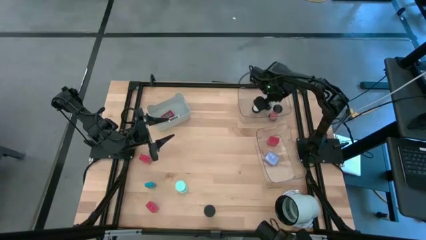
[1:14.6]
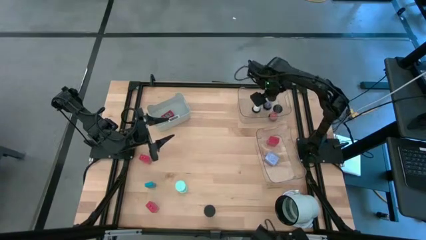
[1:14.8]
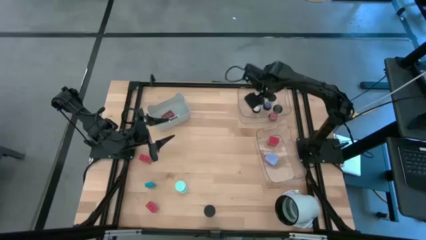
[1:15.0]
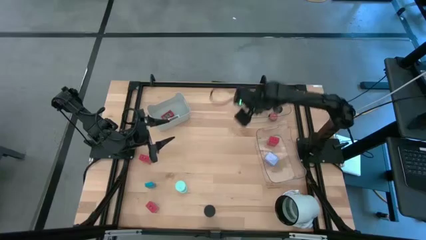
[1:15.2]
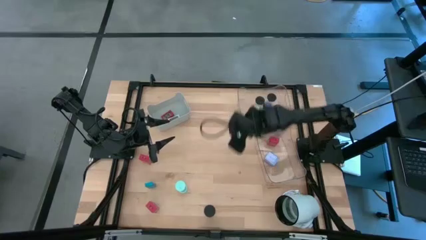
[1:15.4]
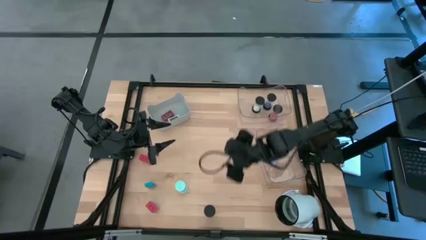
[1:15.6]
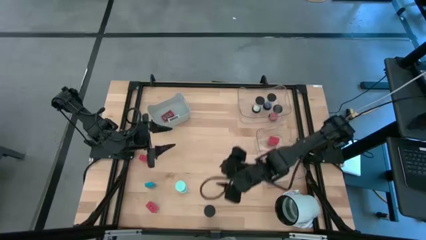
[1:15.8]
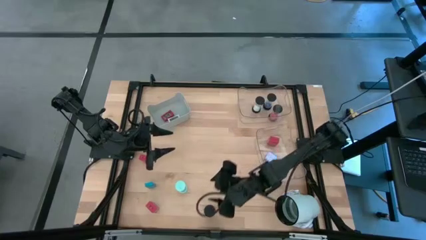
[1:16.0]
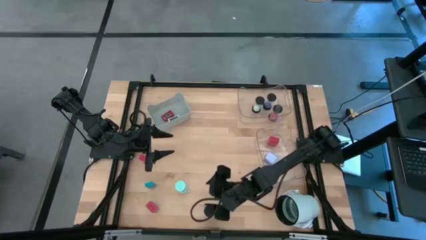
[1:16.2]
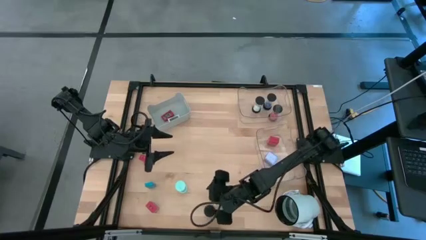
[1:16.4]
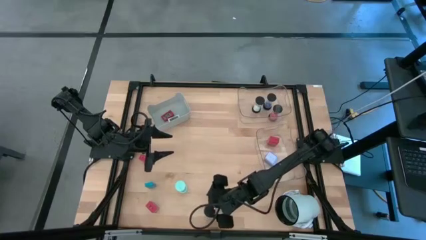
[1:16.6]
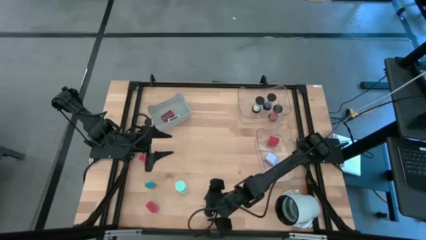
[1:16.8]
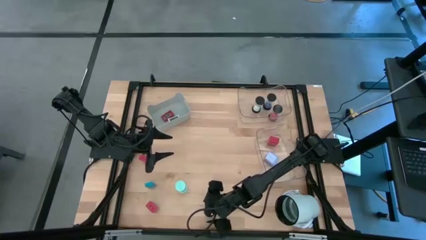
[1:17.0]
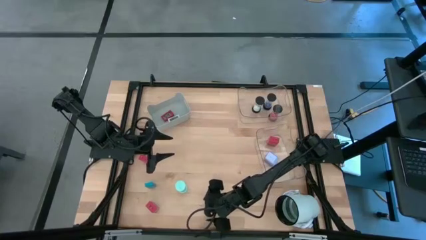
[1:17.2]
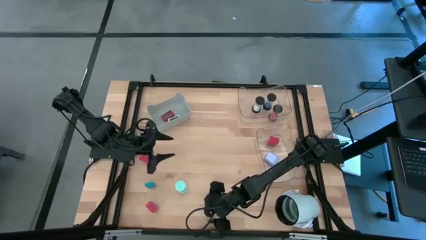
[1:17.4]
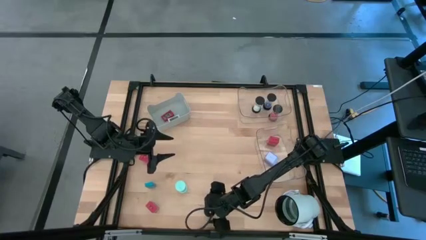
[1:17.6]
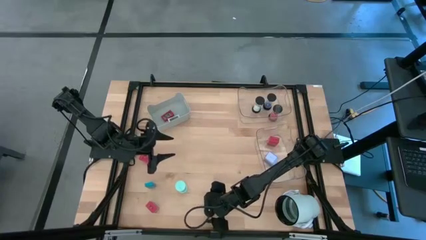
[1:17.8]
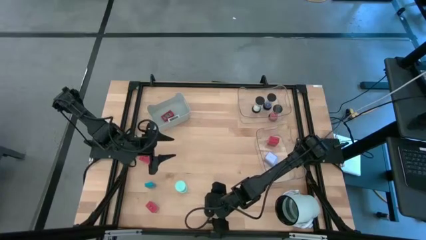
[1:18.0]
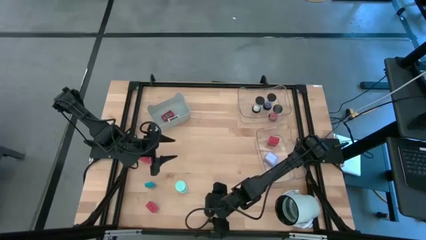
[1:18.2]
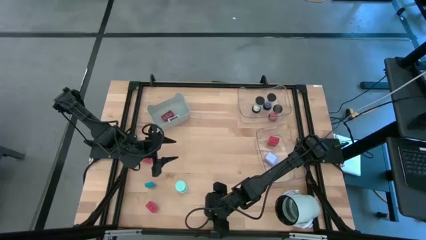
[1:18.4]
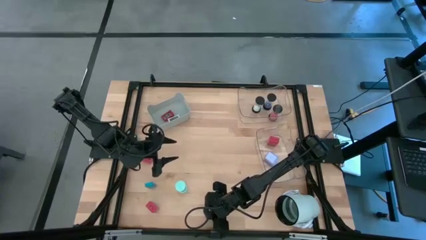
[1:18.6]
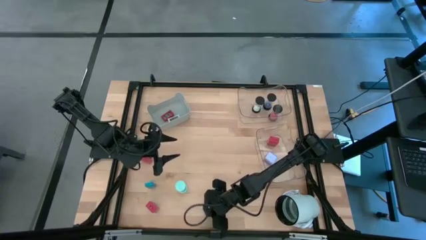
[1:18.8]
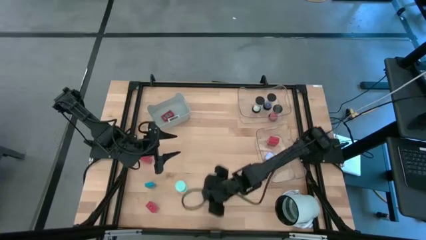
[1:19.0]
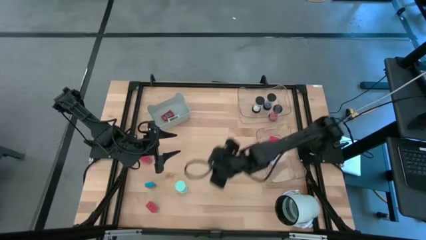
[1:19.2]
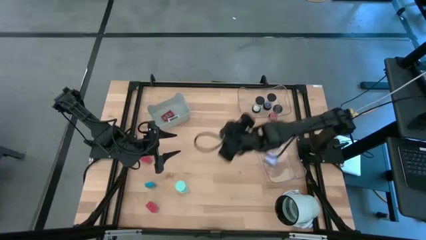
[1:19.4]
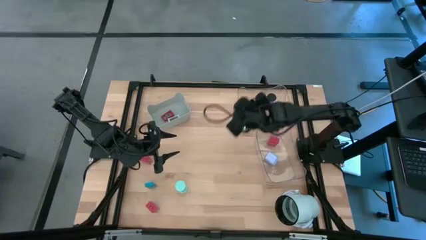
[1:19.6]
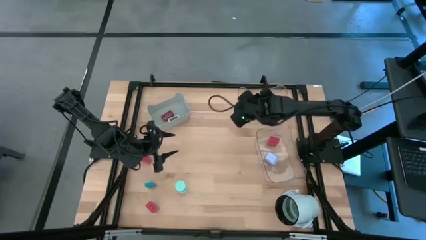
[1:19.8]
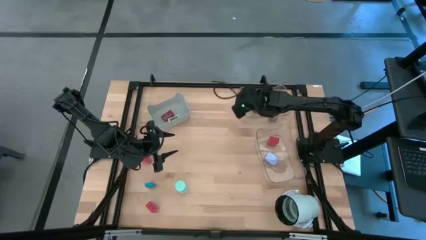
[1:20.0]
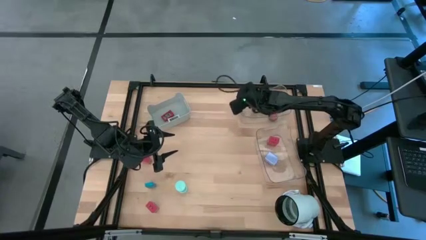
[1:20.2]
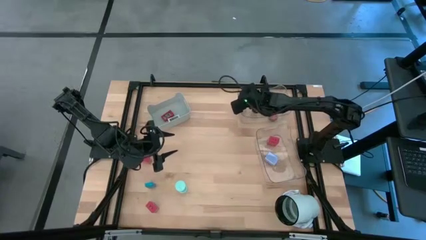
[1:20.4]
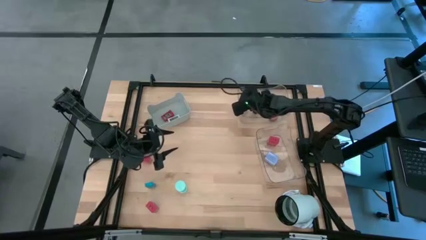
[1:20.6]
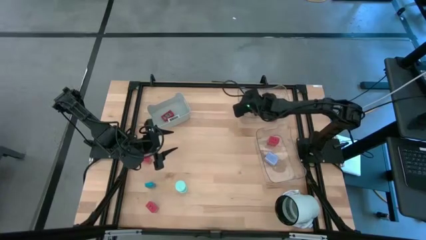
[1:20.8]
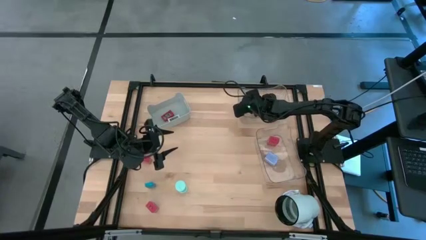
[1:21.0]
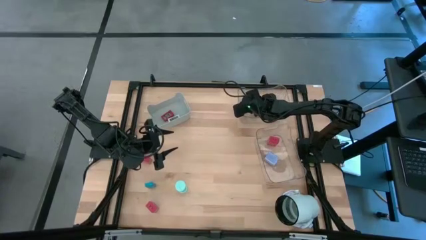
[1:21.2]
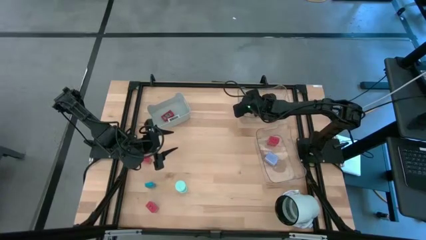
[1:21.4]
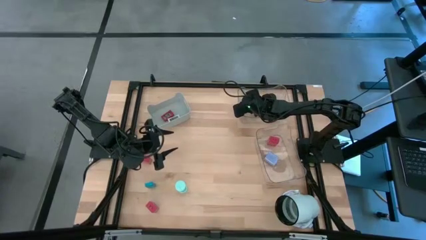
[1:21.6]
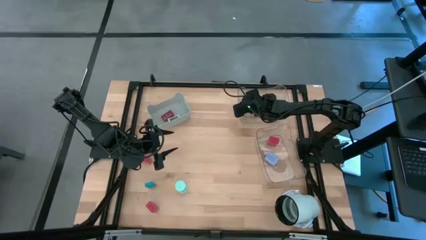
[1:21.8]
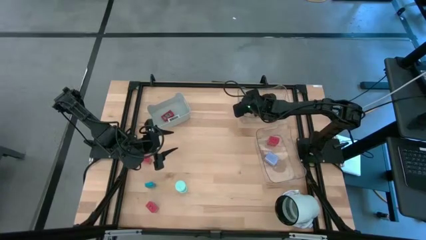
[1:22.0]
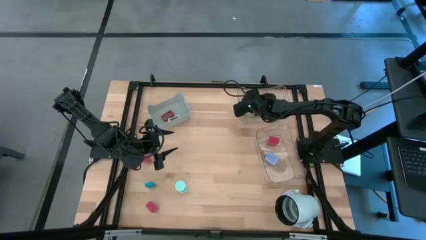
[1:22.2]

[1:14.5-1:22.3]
Task: Pick & Place Office items
Put the blue hourglass into the top transparent bin

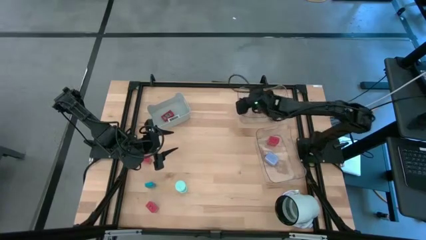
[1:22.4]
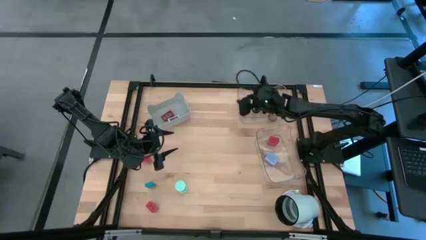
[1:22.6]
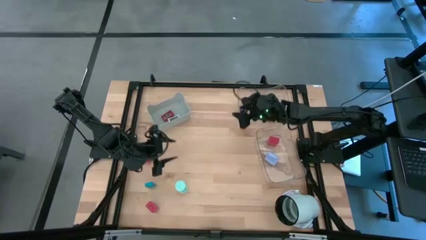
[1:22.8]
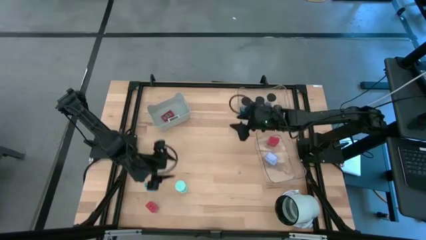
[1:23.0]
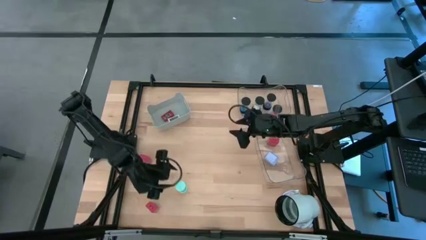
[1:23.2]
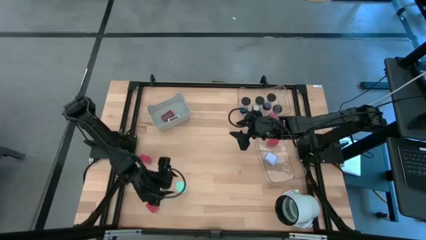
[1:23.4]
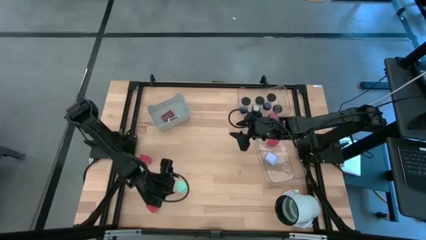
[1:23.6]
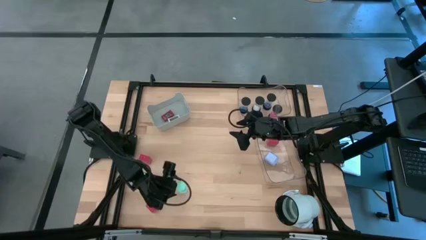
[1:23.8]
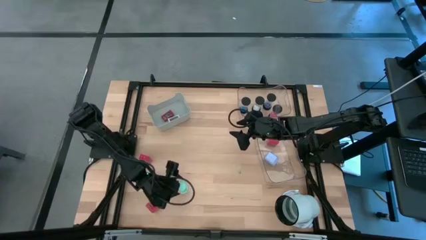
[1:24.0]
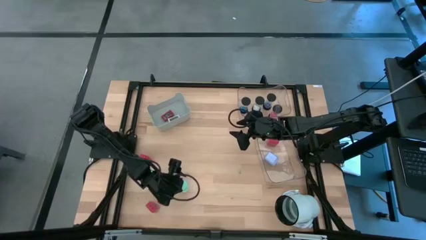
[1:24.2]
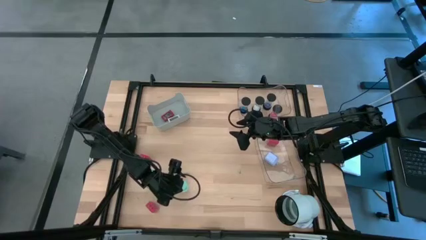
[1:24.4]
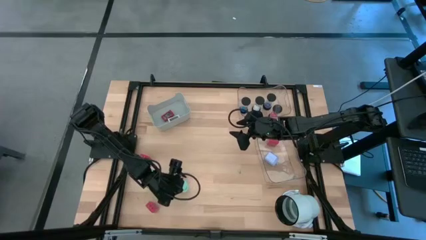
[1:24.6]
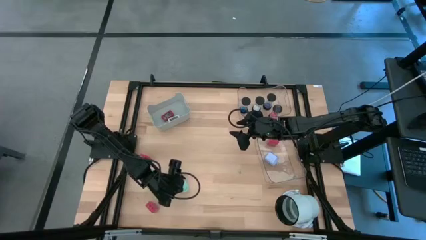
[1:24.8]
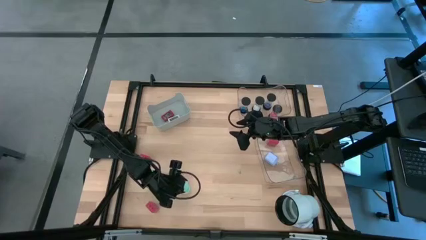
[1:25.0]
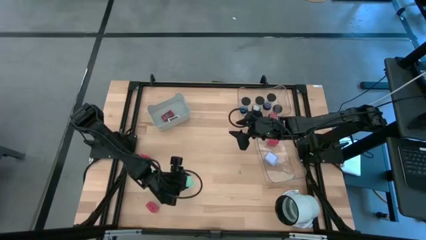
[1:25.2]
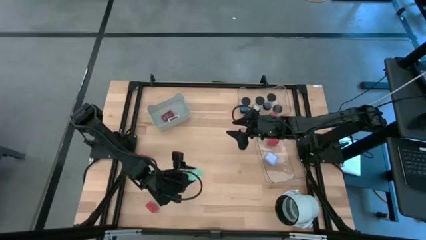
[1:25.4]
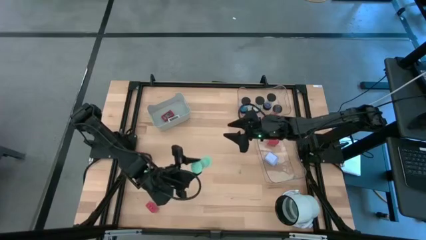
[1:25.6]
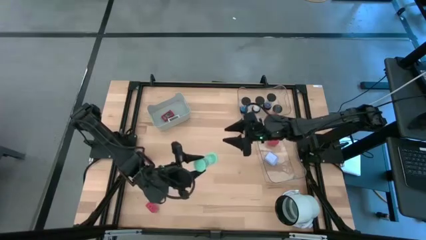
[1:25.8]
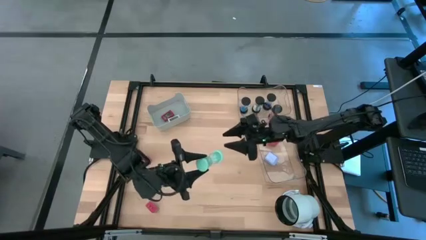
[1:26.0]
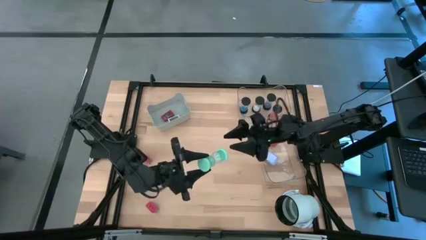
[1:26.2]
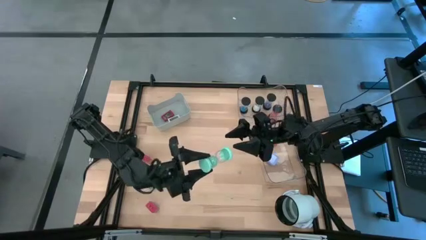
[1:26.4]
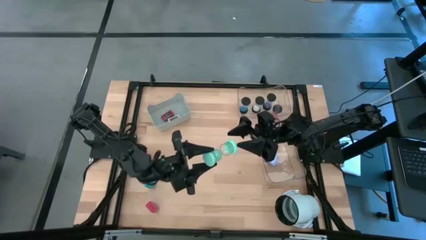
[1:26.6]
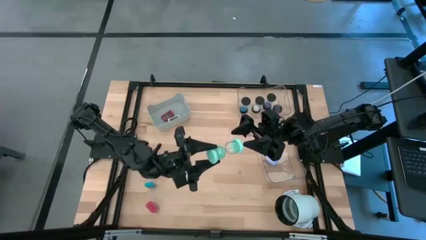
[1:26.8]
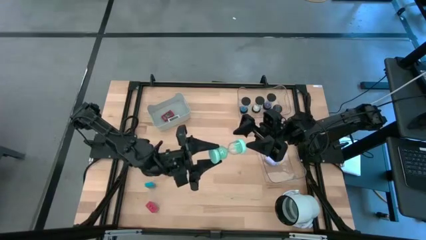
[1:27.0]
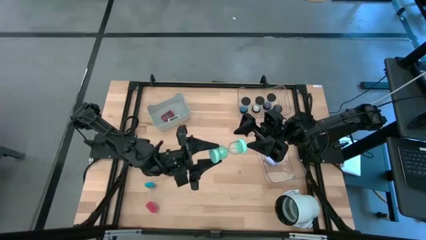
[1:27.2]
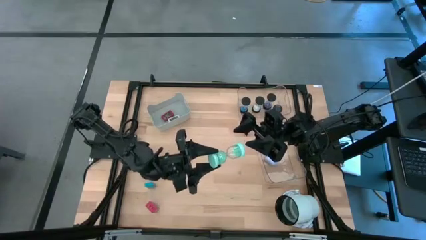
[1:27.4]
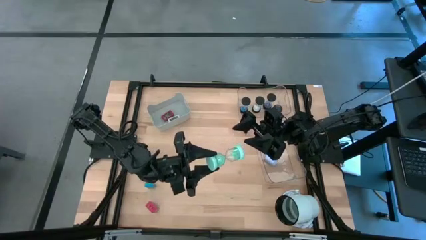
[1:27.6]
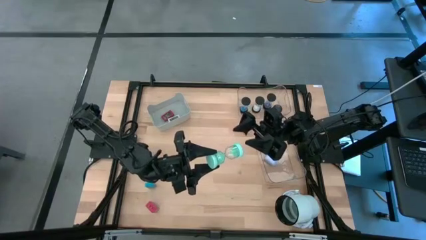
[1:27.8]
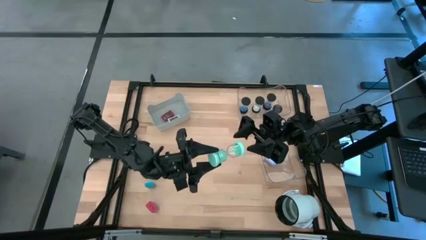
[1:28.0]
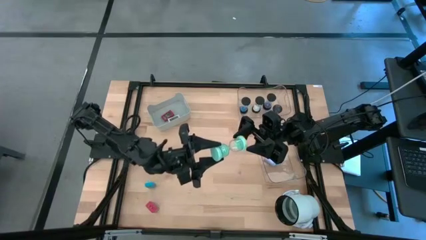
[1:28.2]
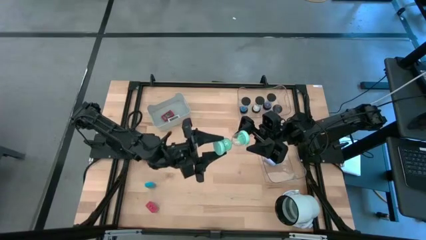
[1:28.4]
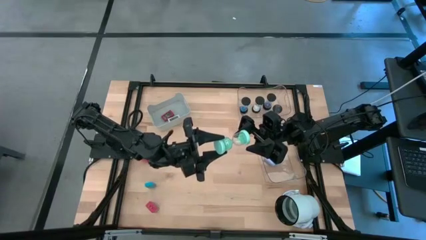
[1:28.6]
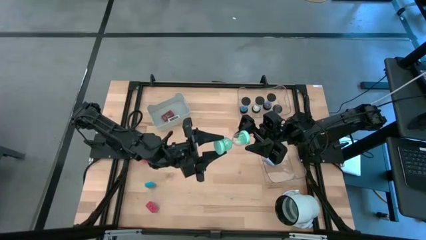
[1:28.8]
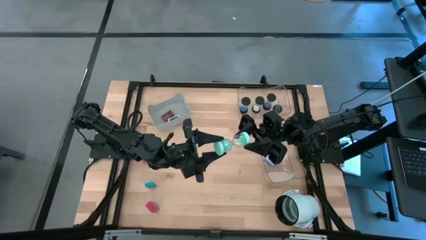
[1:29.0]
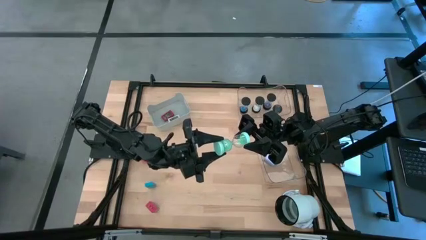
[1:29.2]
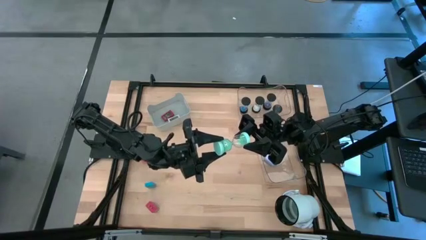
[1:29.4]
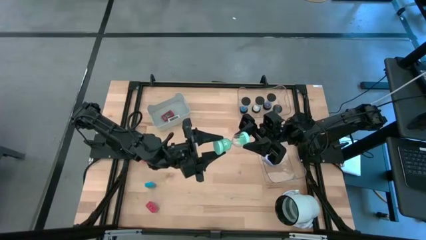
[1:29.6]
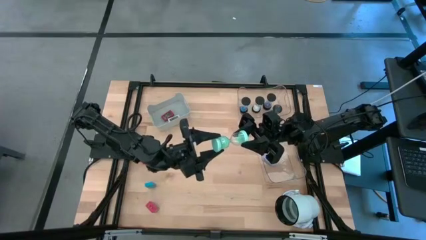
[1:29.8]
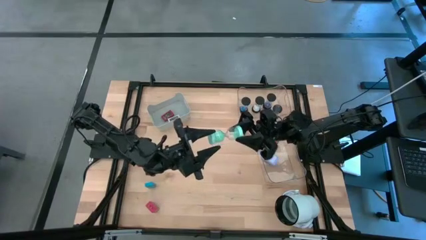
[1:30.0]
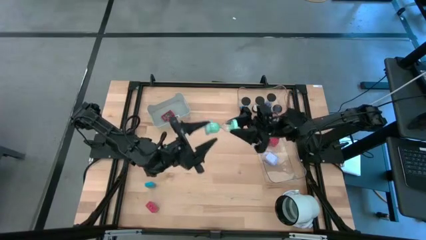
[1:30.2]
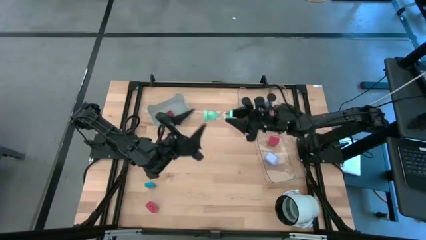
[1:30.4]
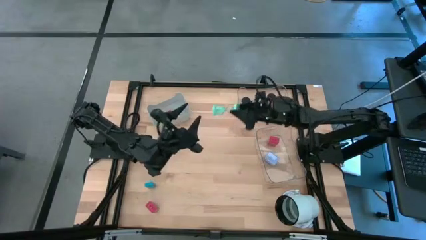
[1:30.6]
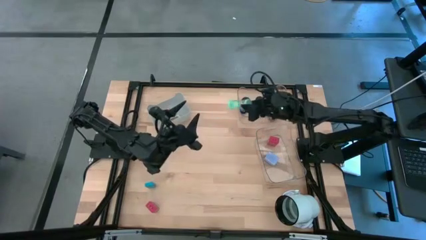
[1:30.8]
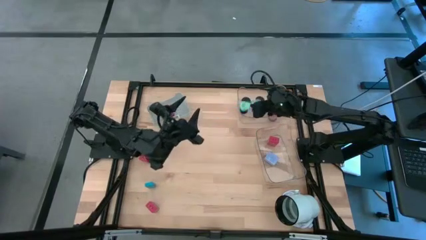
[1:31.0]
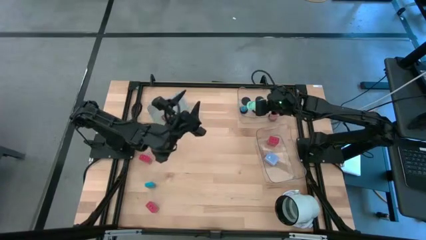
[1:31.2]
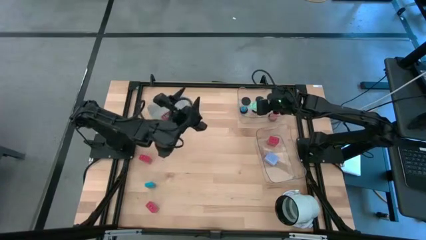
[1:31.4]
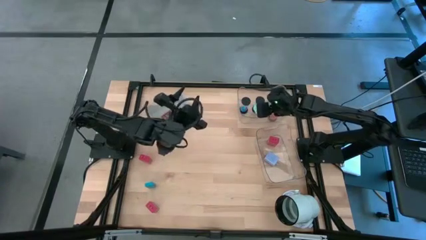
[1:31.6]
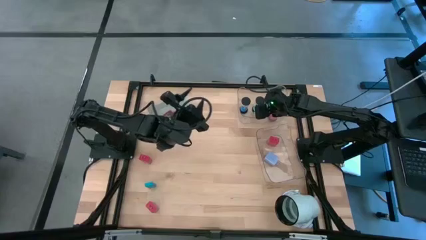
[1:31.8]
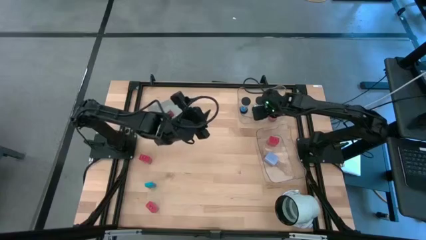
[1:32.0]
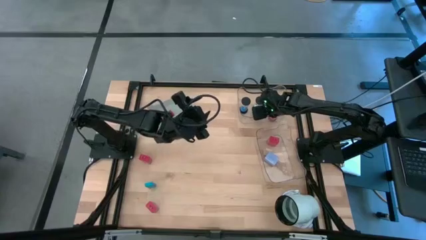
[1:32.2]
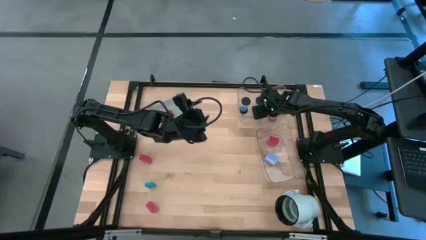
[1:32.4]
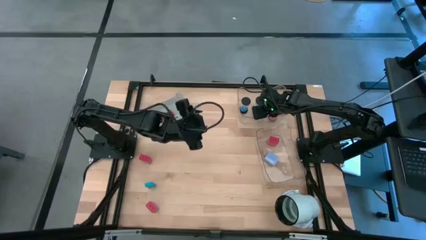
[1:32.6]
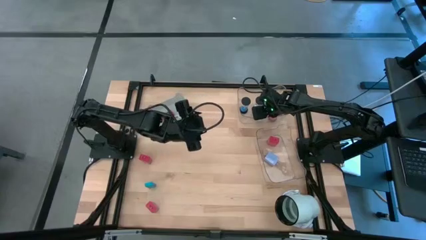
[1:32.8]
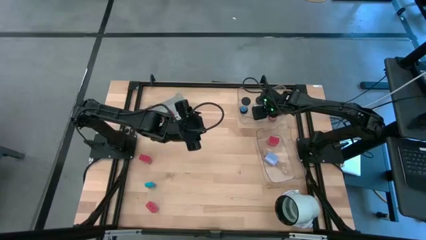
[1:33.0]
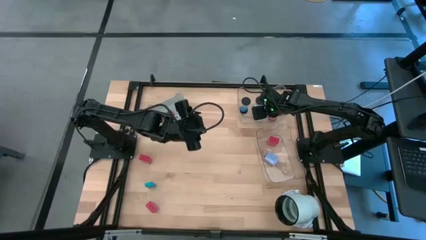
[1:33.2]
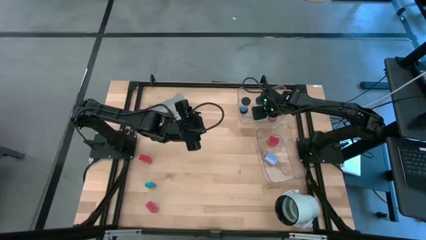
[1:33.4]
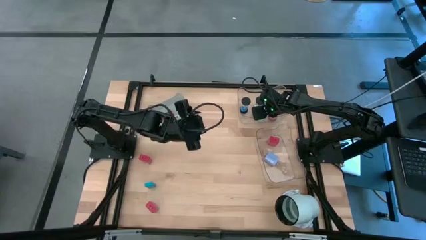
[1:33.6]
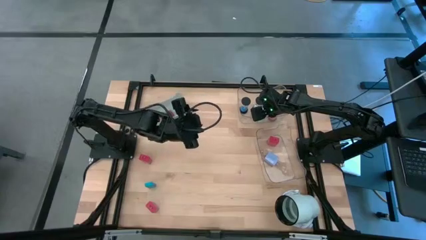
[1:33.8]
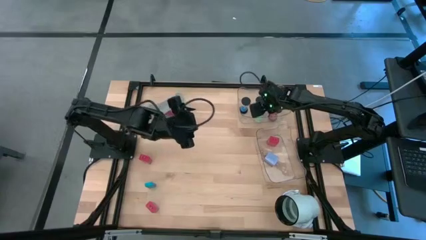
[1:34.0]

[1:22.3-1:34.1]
Put the green hourglass into the top transparent bin
